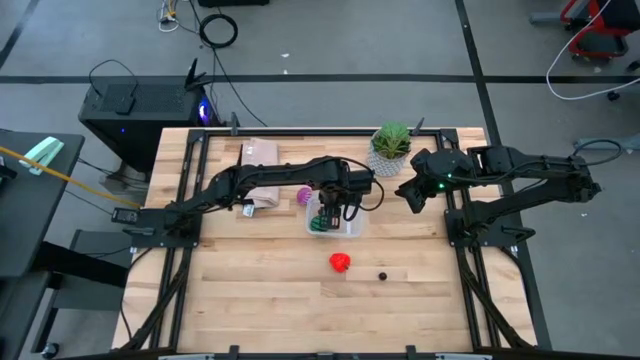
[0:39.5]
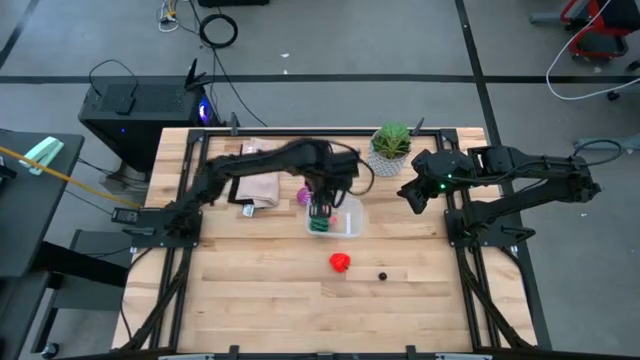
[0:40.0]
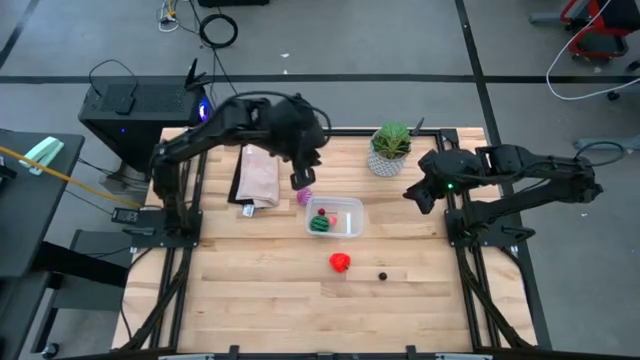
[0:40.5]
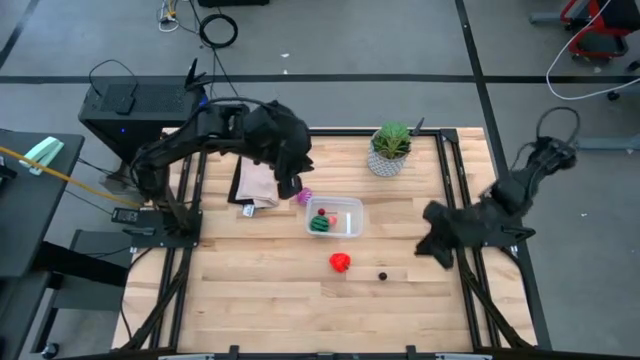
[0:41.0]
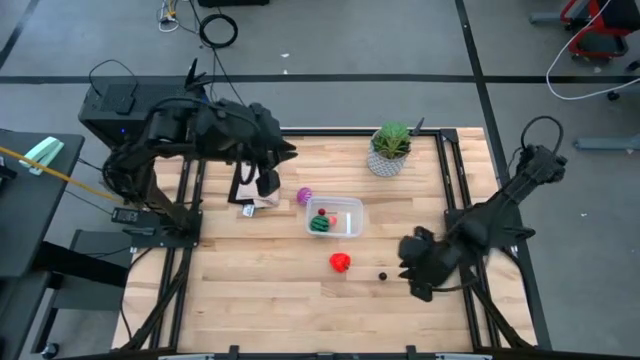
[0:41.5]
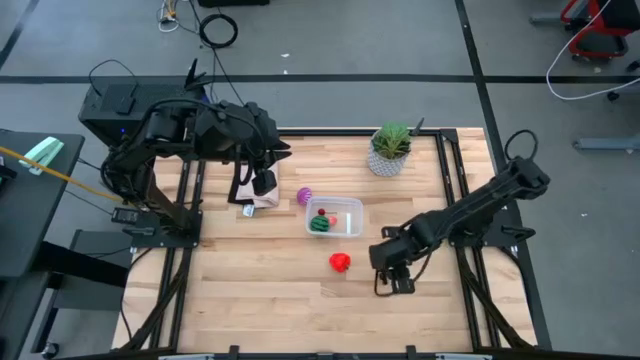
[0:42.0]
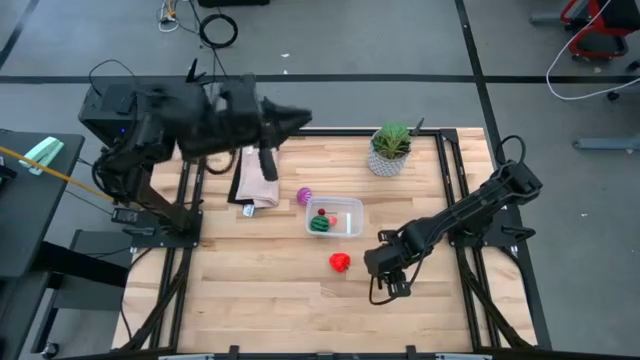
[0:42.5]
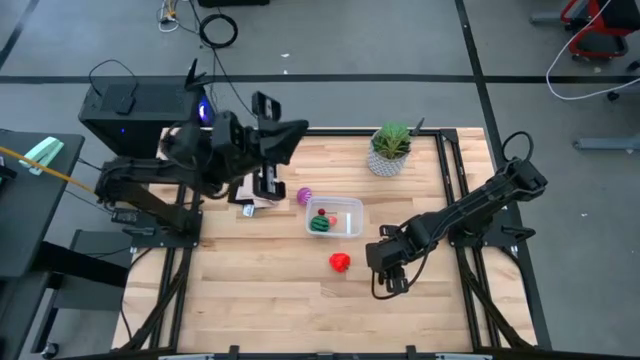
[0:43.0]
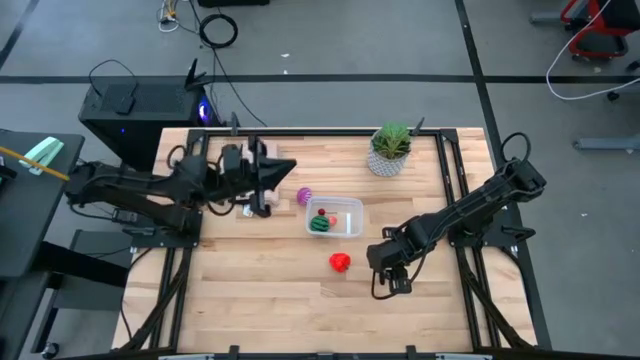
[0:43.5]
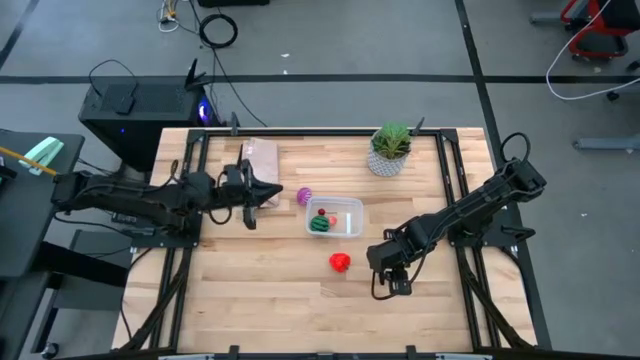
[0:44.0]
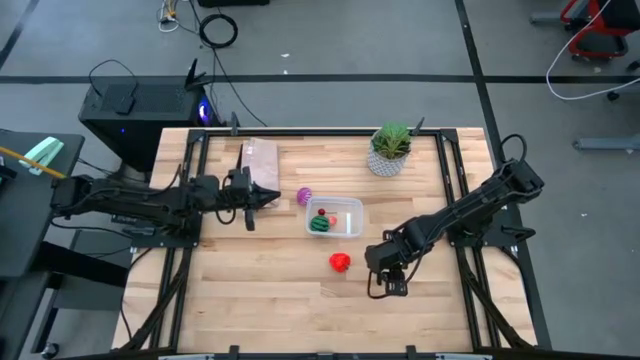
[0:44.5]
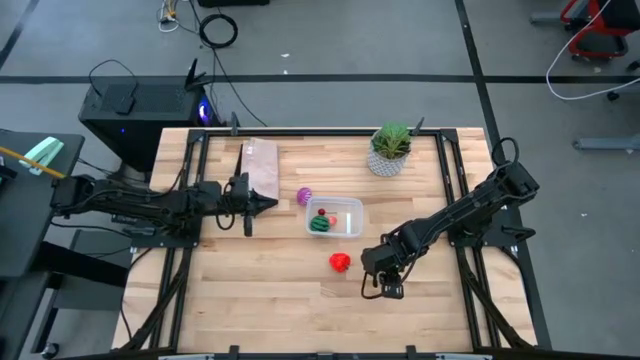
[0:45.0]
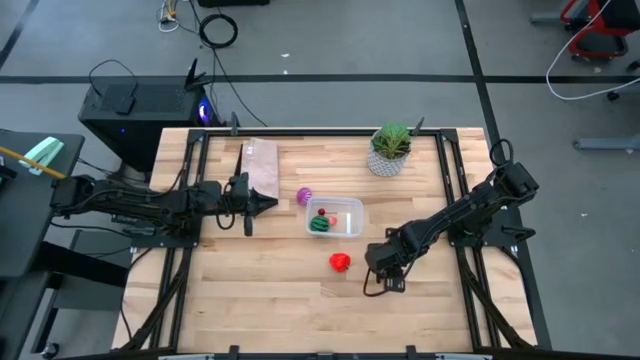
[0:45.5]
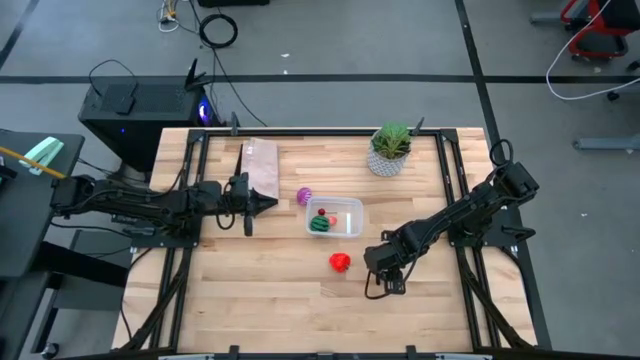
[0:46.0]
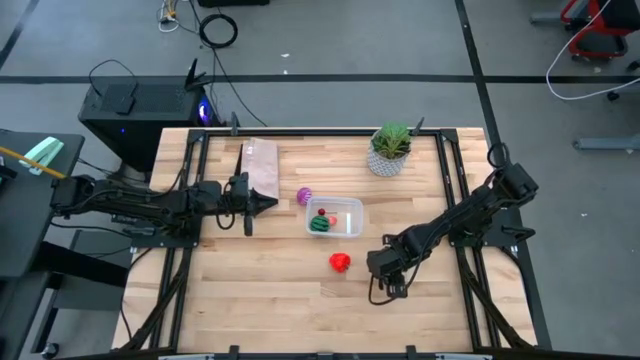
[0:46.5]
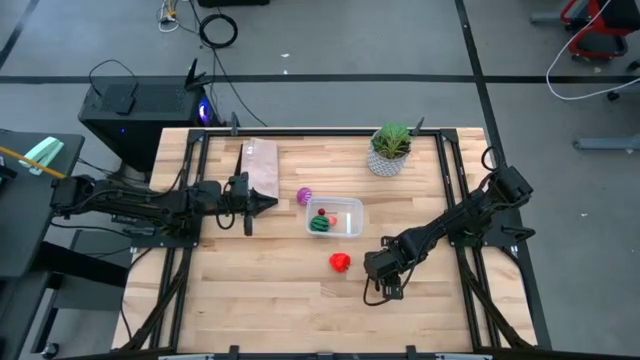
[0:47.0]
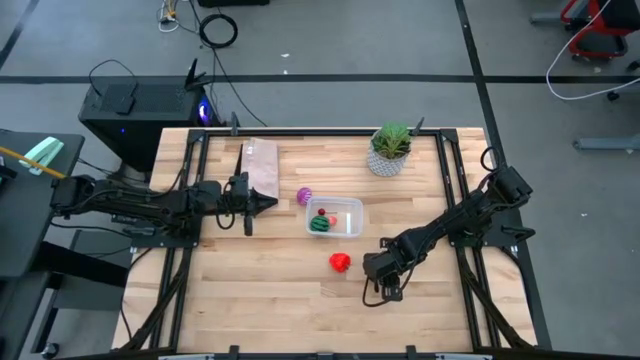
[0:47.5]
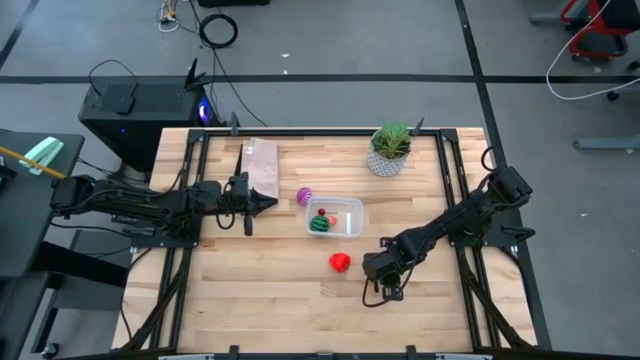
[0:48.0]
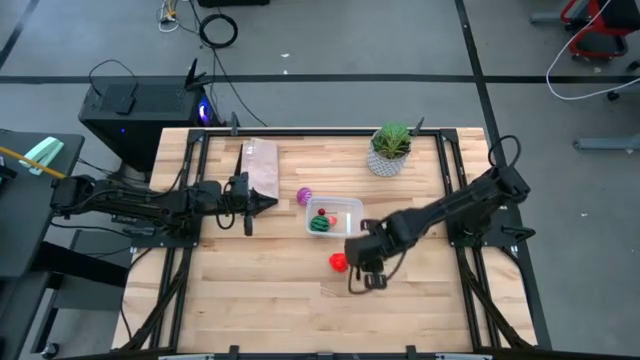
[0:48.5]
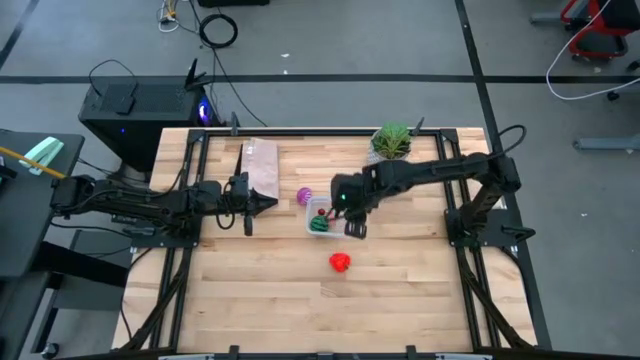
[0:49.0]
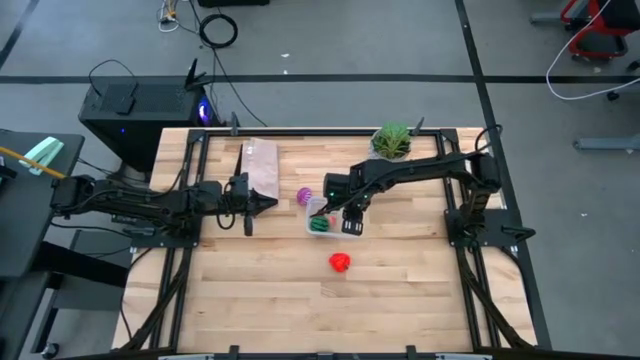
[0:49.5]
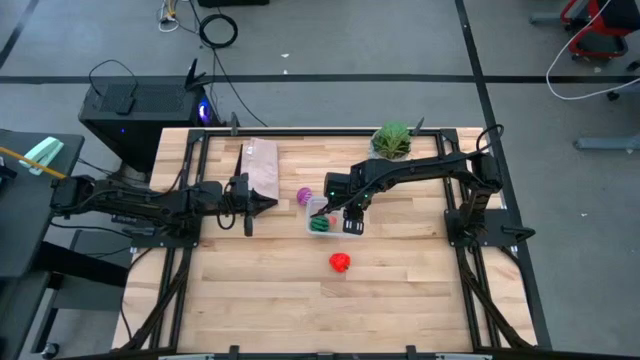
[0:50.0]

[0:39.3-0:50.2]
Task: Pick and placing Produce into tupperware
Put the plum into the transparent bin

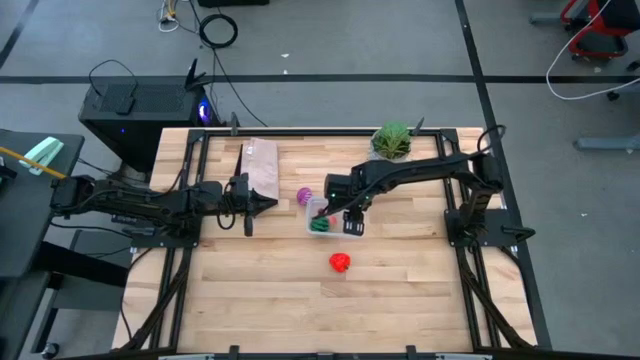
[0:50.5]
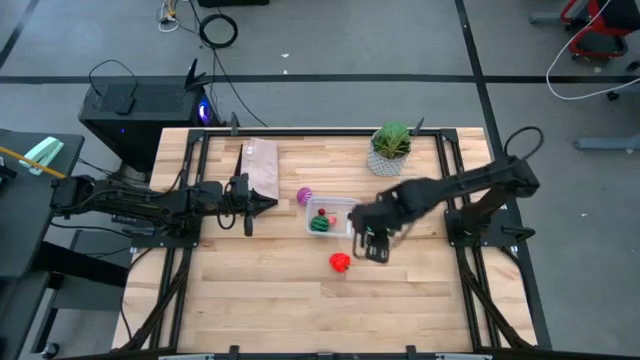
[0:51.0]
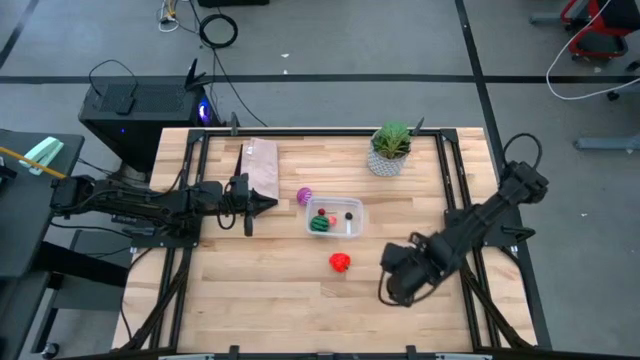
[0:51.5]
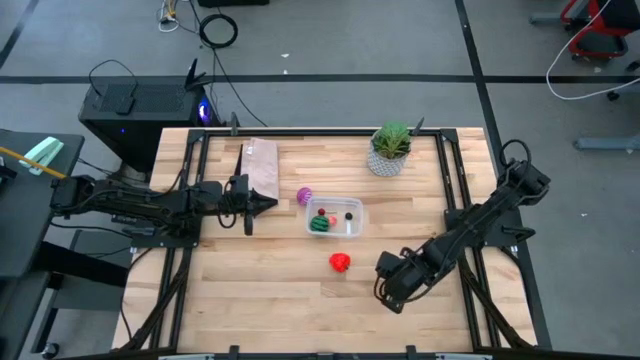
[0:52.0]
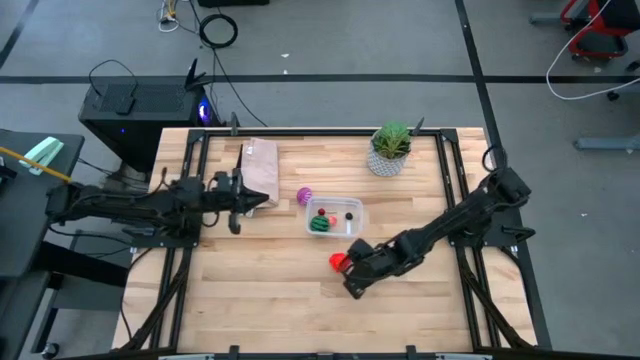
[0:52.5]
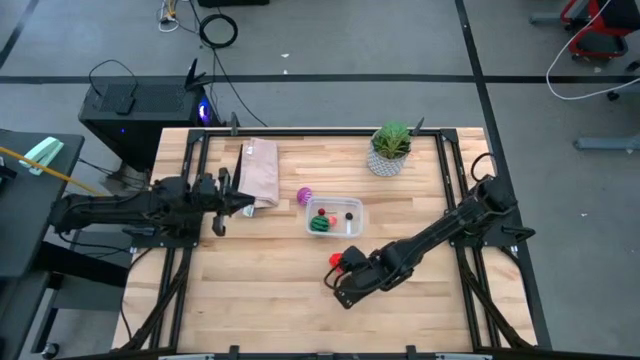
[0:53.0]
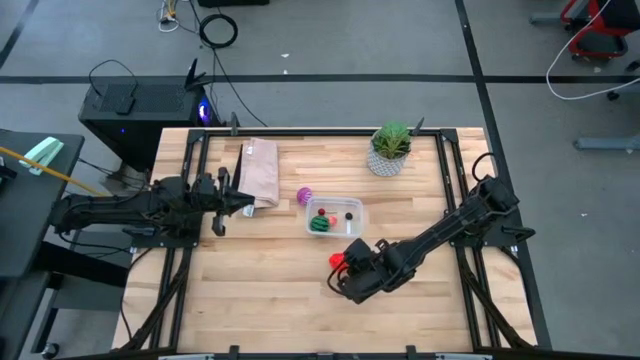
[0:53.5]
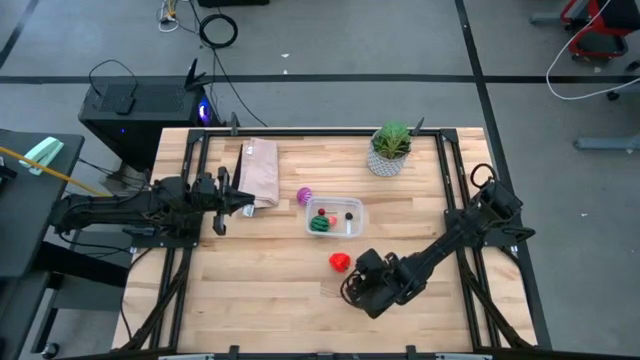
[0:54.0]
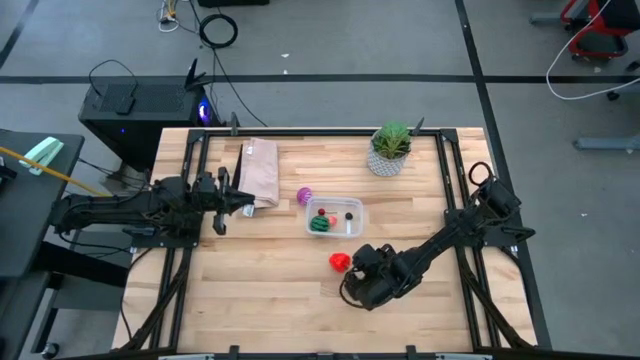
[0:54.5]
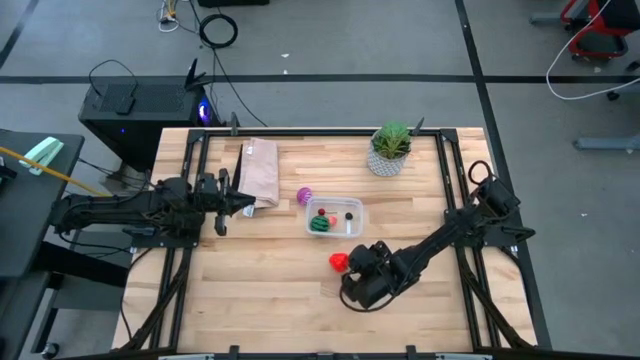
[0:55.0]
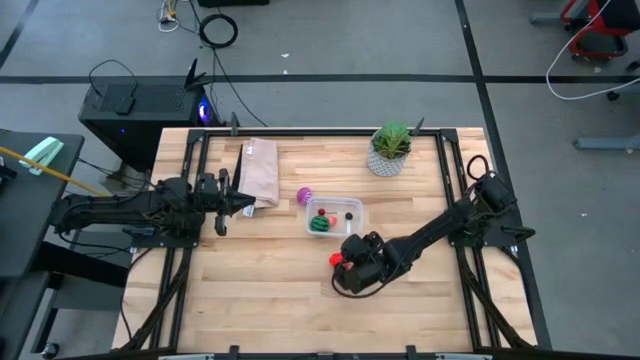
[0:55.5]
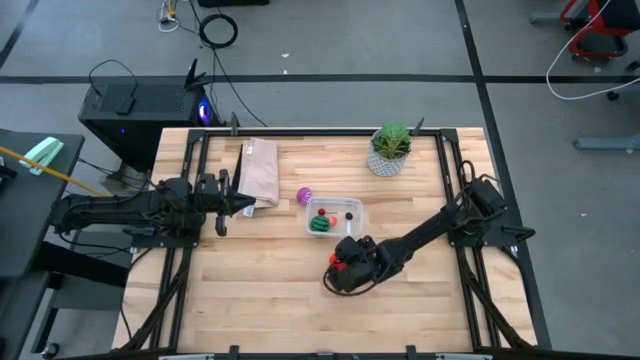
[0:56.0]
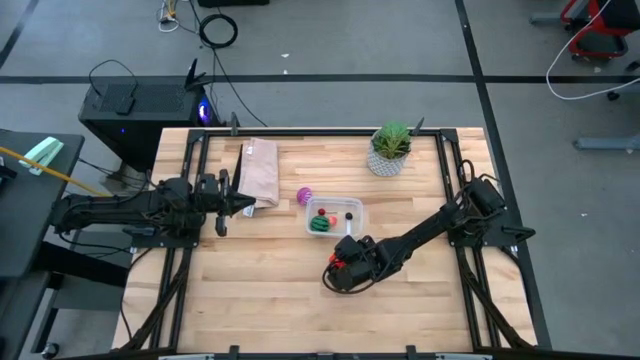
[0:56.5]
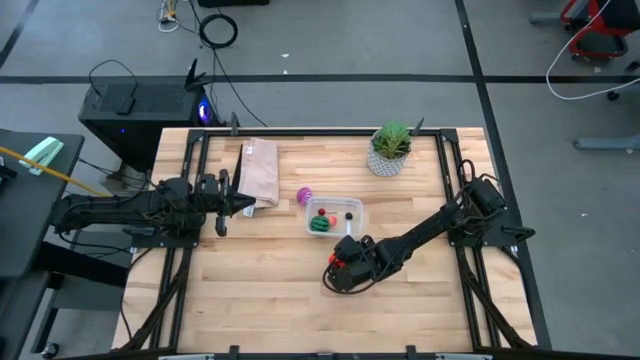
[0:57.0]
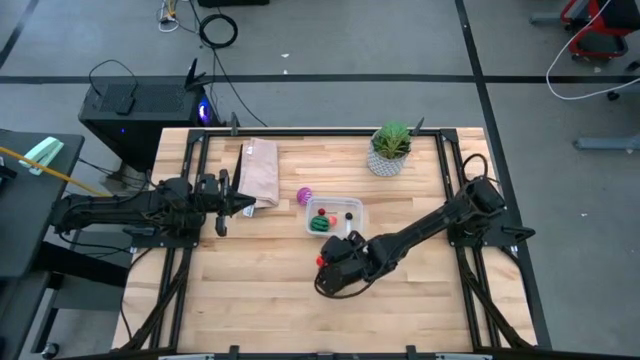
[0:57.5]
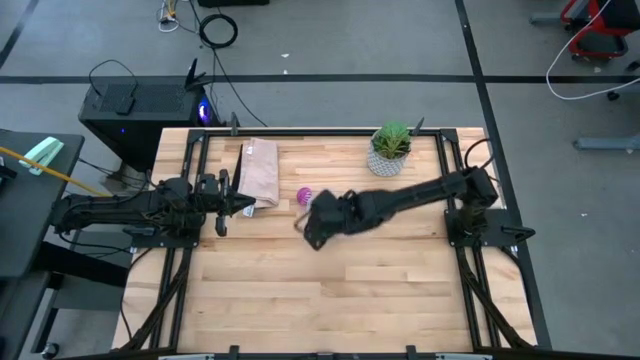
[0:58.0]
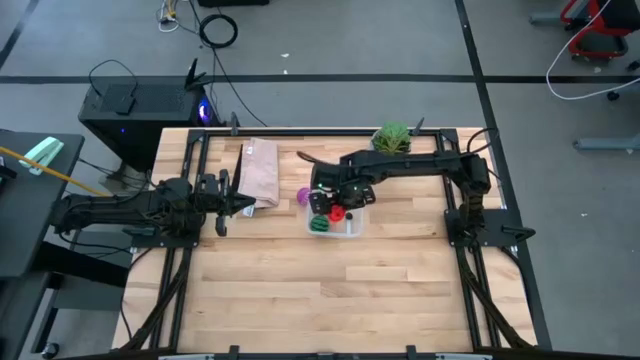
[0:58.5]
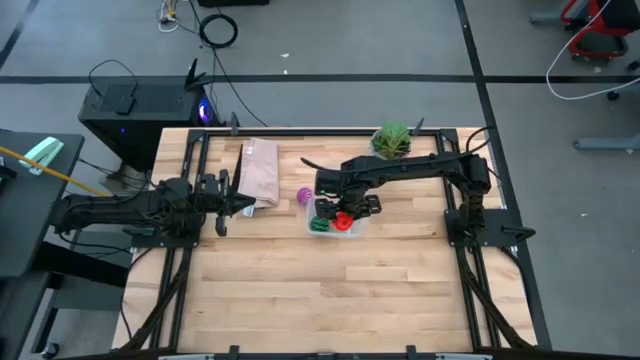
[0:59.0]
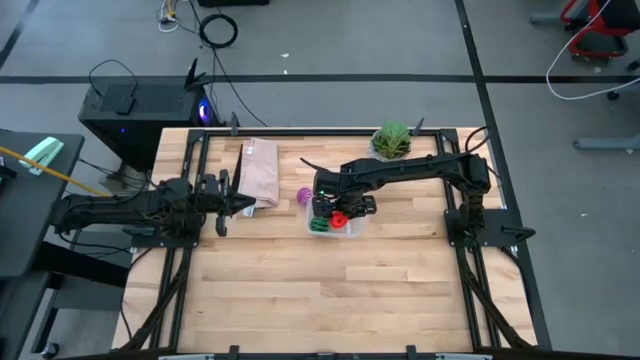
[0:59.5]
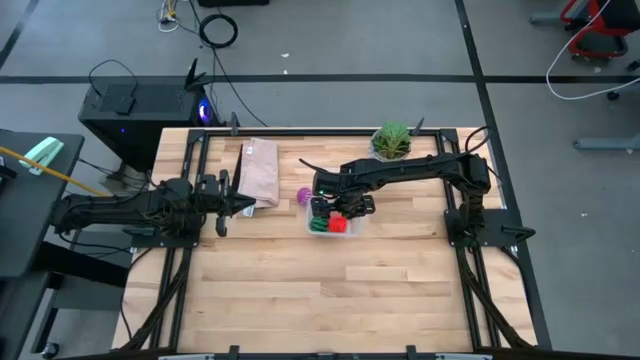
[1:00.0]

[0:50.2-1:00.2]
Put the apple into the transparent bin
